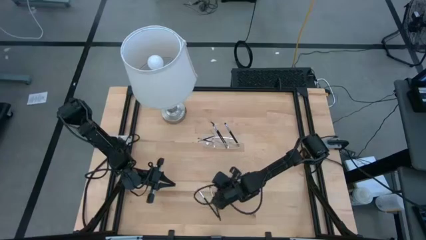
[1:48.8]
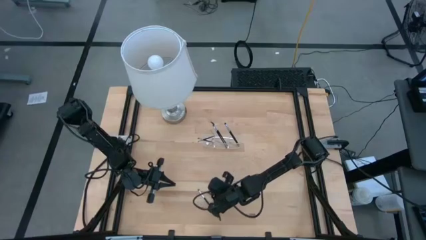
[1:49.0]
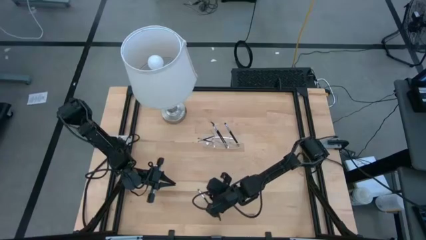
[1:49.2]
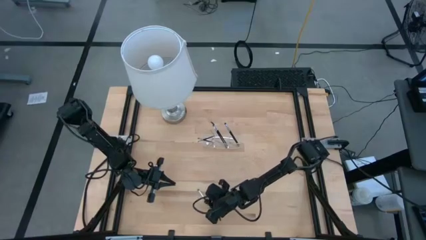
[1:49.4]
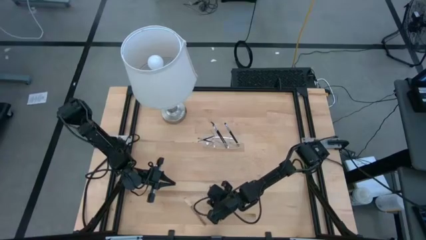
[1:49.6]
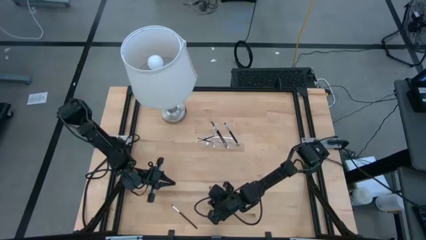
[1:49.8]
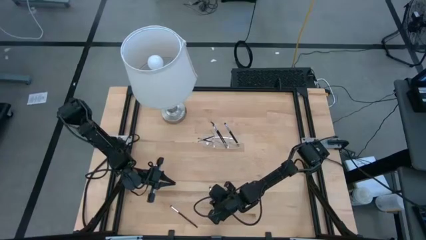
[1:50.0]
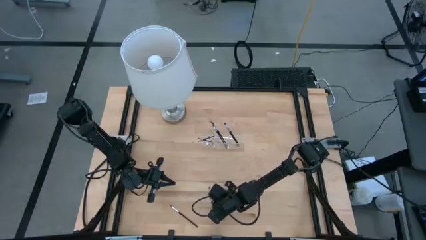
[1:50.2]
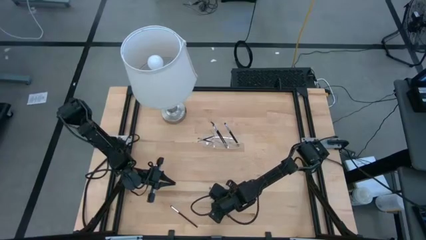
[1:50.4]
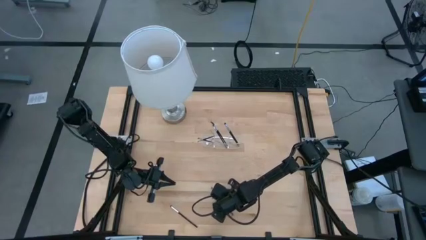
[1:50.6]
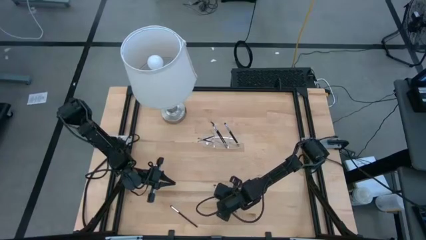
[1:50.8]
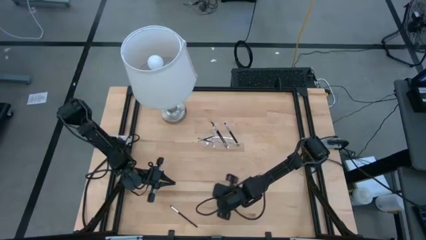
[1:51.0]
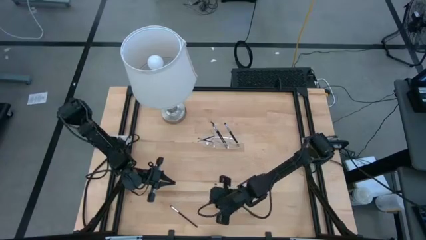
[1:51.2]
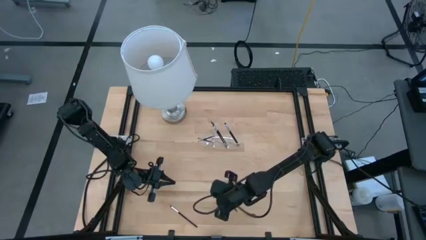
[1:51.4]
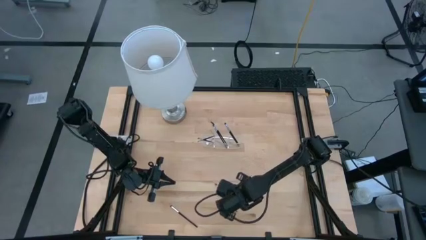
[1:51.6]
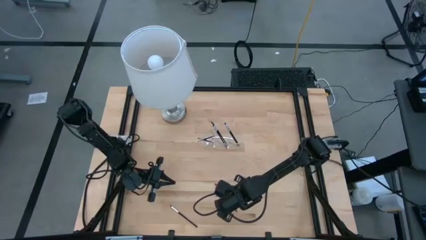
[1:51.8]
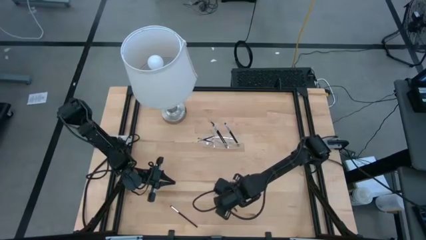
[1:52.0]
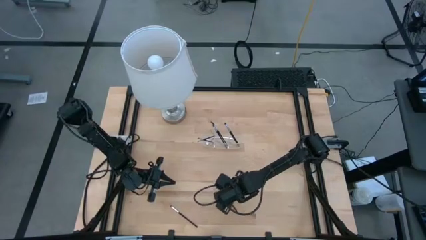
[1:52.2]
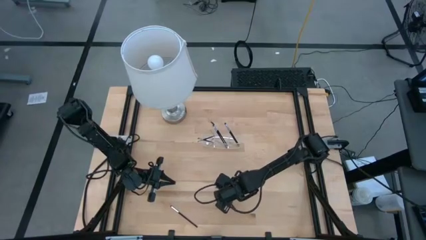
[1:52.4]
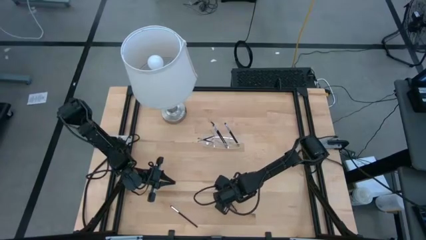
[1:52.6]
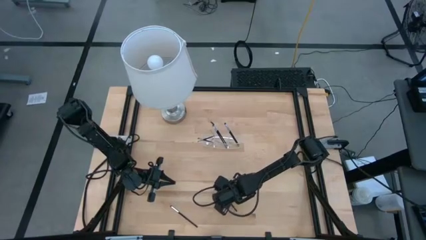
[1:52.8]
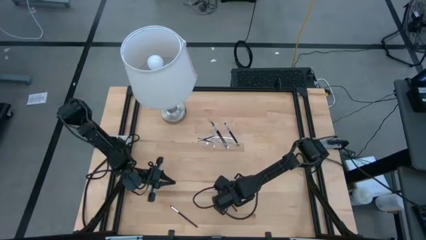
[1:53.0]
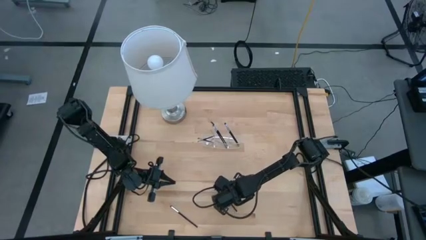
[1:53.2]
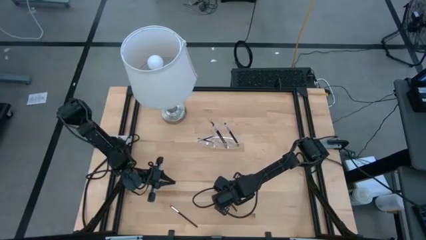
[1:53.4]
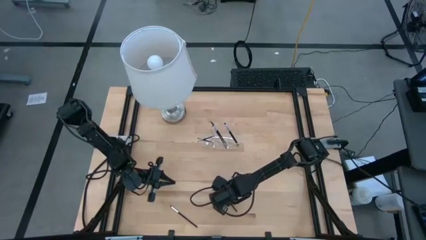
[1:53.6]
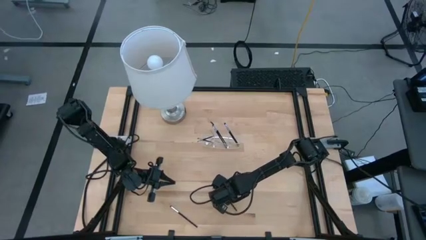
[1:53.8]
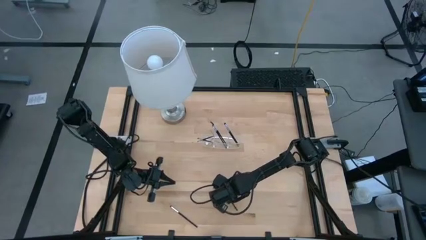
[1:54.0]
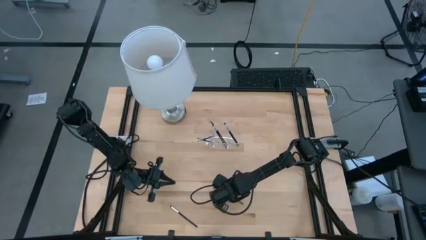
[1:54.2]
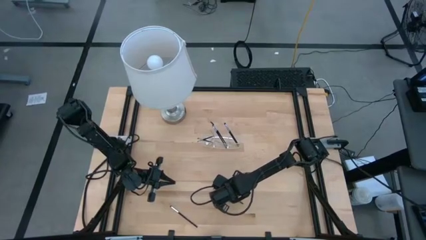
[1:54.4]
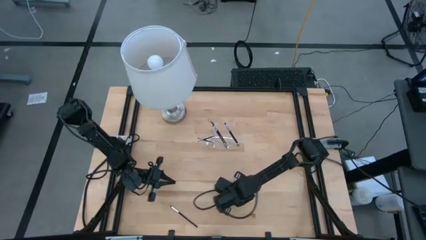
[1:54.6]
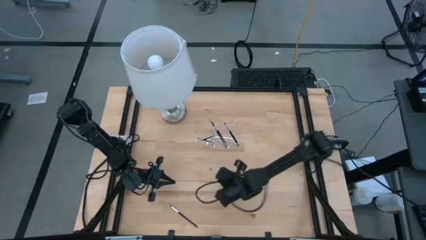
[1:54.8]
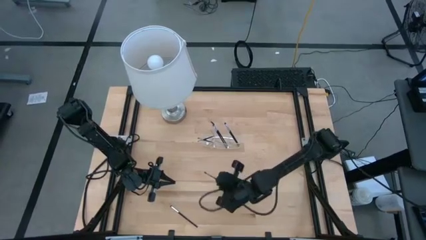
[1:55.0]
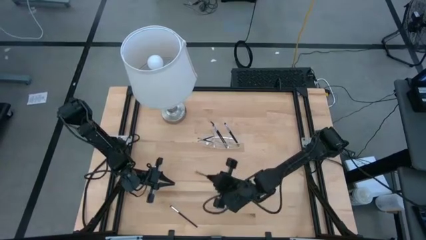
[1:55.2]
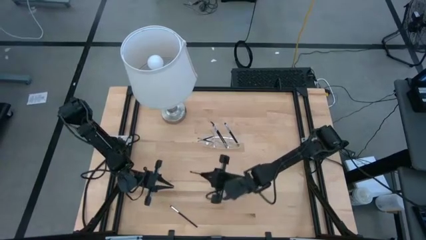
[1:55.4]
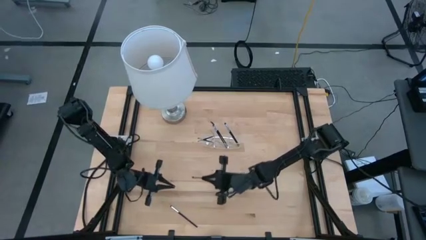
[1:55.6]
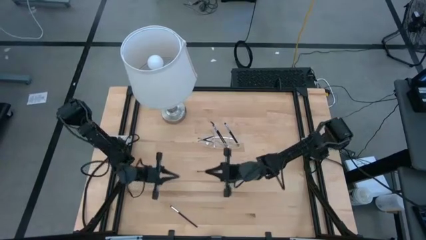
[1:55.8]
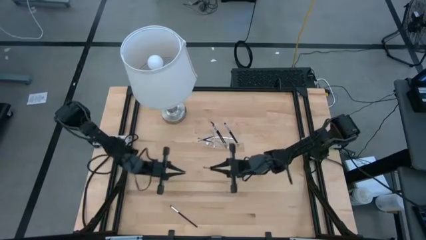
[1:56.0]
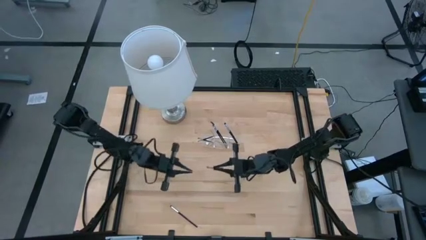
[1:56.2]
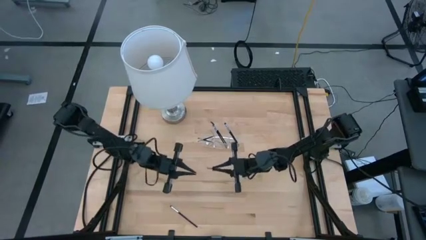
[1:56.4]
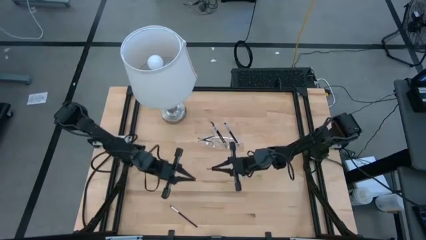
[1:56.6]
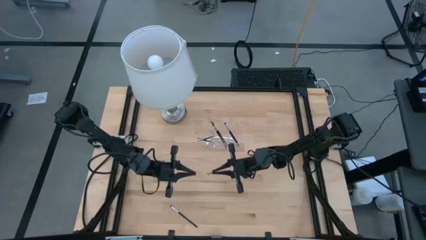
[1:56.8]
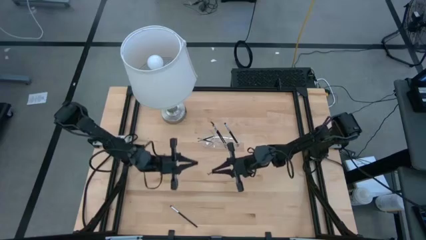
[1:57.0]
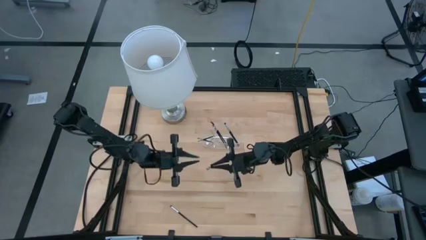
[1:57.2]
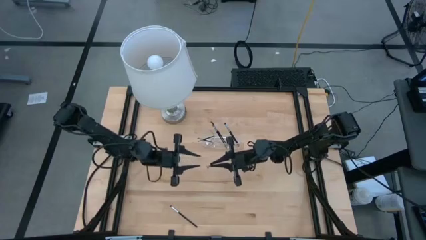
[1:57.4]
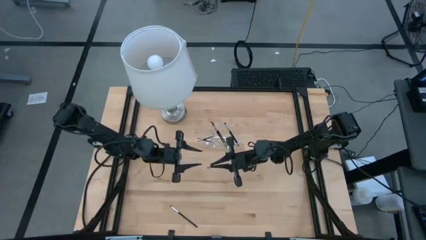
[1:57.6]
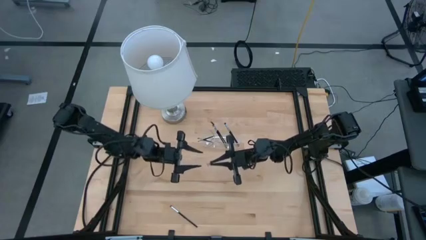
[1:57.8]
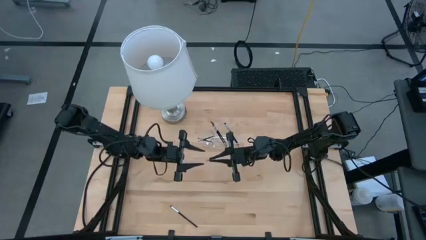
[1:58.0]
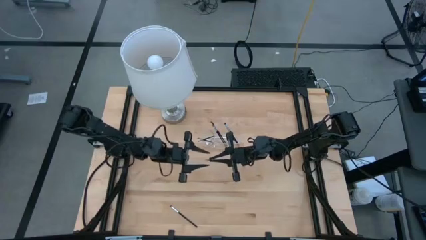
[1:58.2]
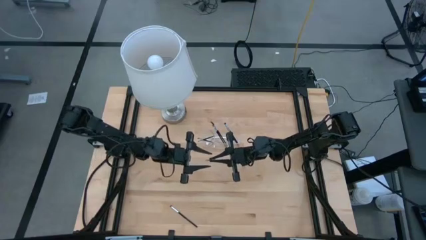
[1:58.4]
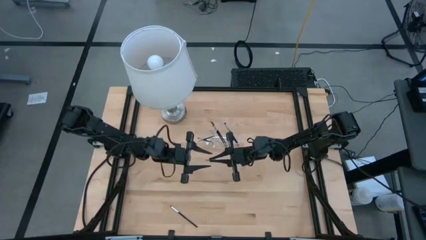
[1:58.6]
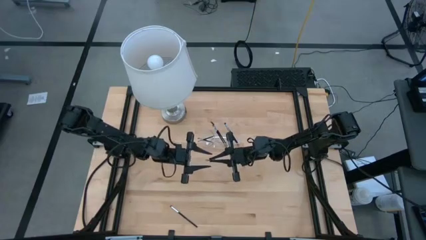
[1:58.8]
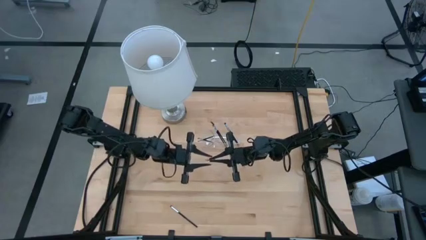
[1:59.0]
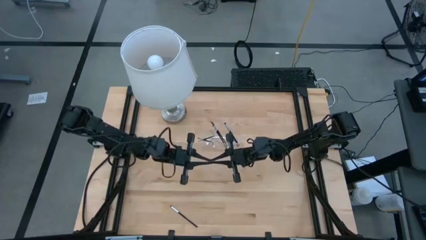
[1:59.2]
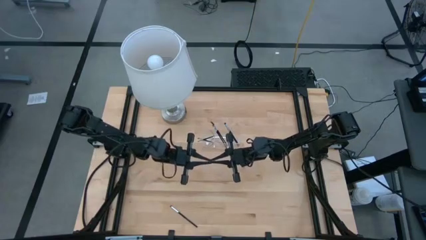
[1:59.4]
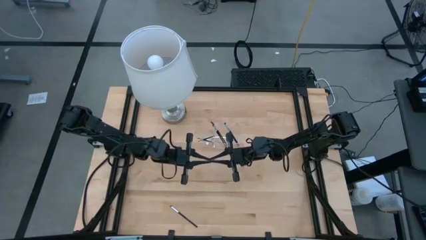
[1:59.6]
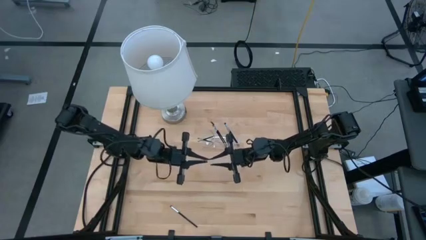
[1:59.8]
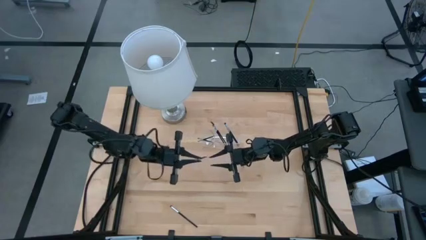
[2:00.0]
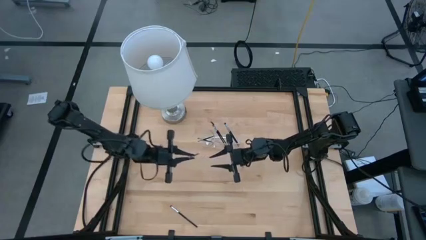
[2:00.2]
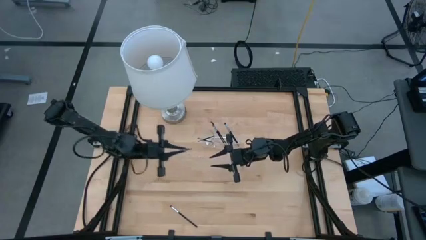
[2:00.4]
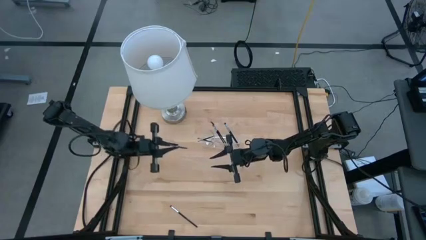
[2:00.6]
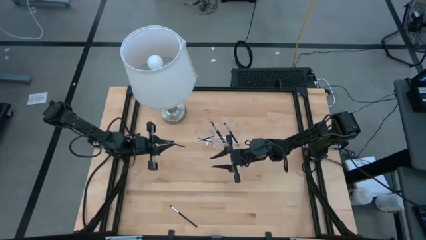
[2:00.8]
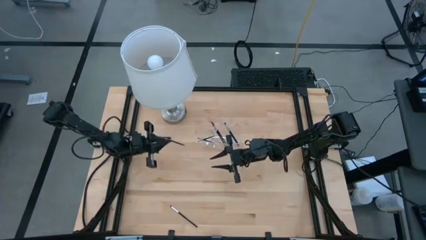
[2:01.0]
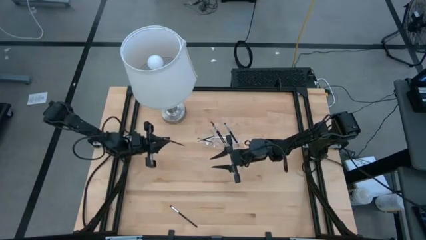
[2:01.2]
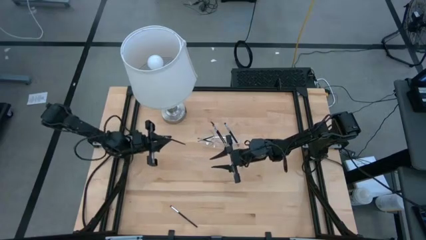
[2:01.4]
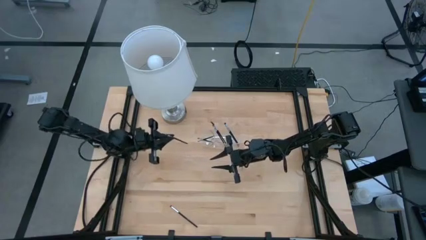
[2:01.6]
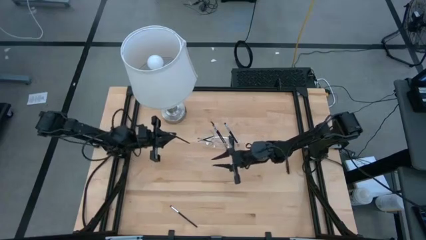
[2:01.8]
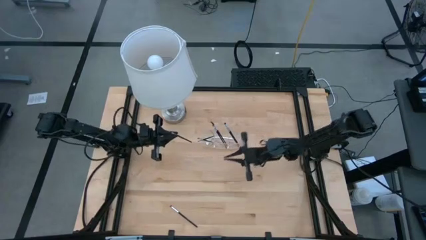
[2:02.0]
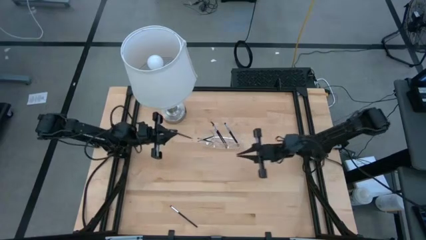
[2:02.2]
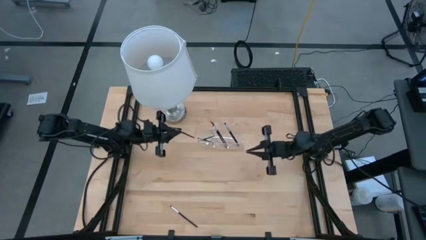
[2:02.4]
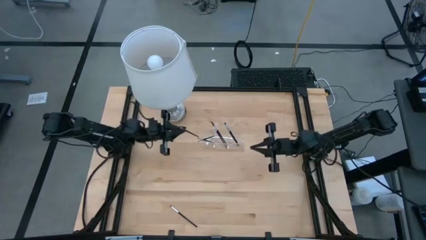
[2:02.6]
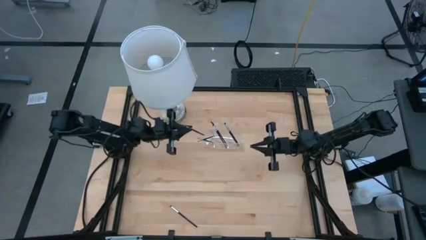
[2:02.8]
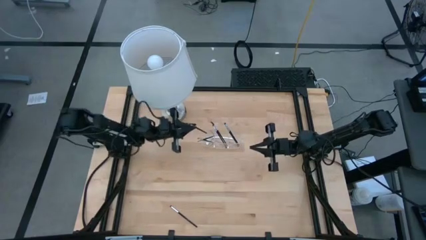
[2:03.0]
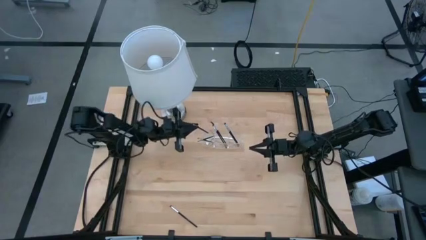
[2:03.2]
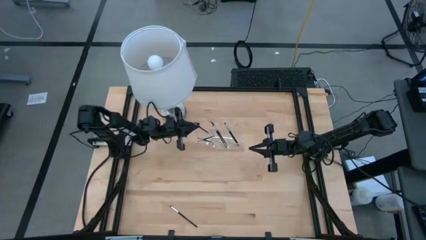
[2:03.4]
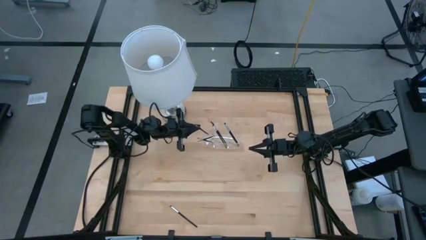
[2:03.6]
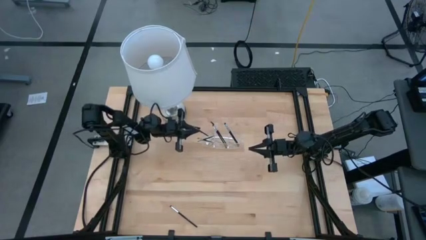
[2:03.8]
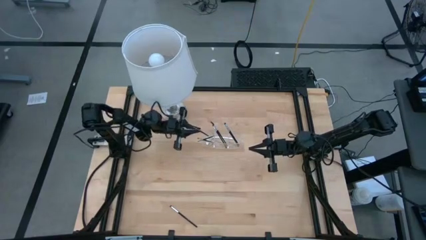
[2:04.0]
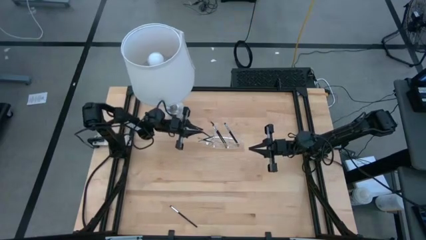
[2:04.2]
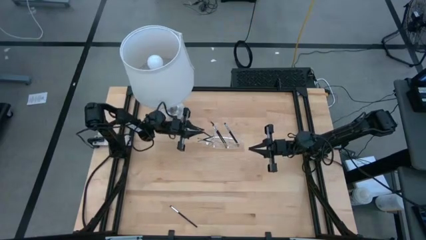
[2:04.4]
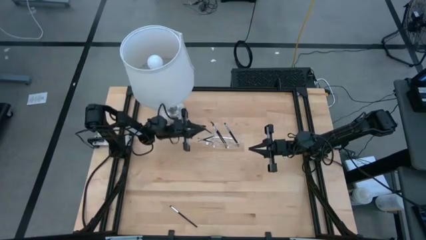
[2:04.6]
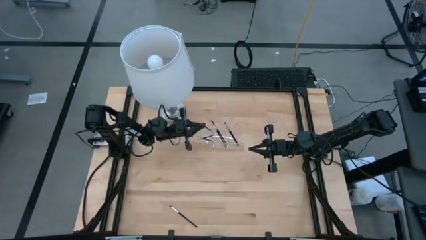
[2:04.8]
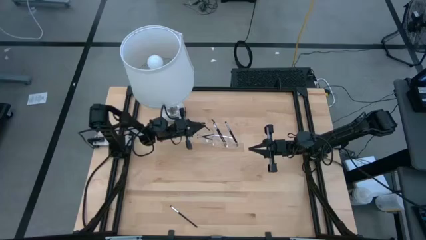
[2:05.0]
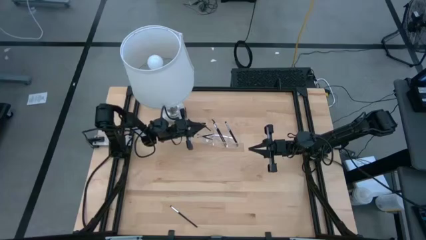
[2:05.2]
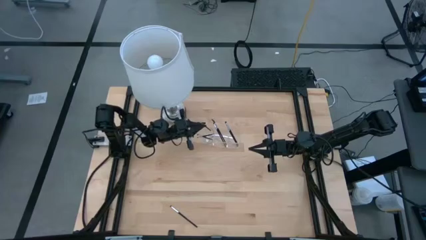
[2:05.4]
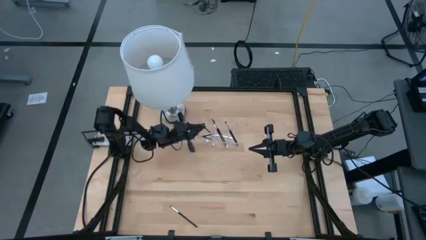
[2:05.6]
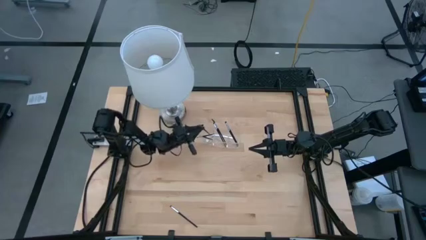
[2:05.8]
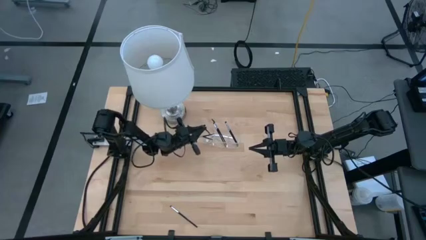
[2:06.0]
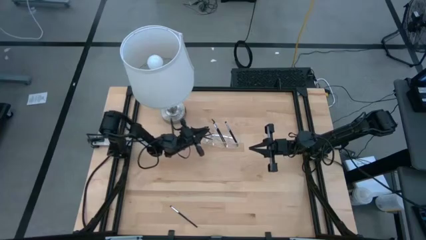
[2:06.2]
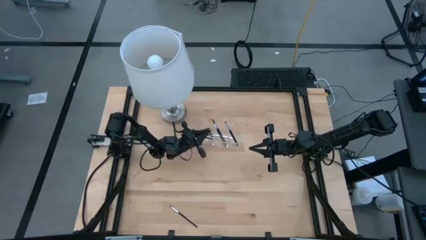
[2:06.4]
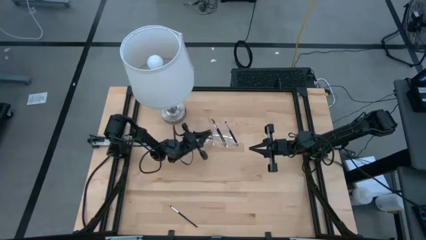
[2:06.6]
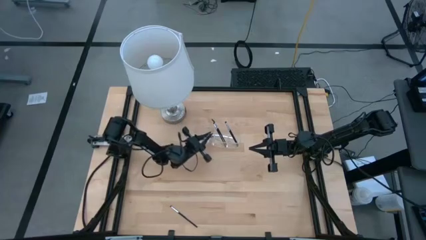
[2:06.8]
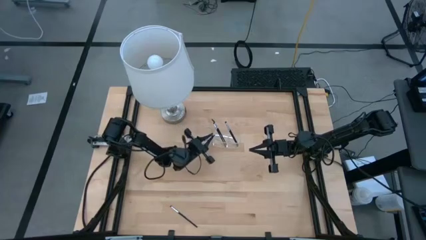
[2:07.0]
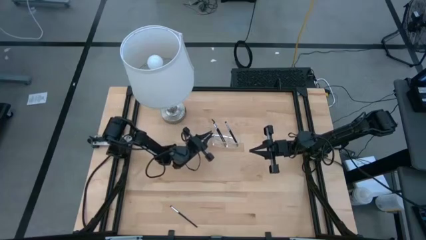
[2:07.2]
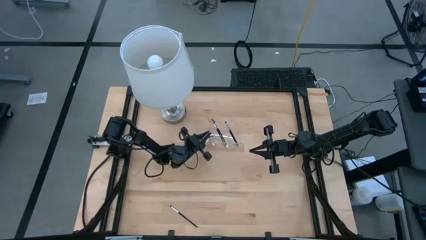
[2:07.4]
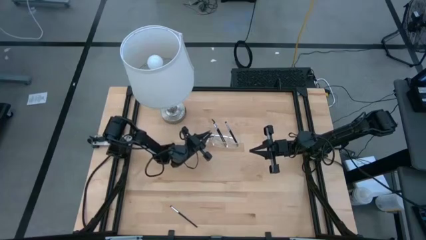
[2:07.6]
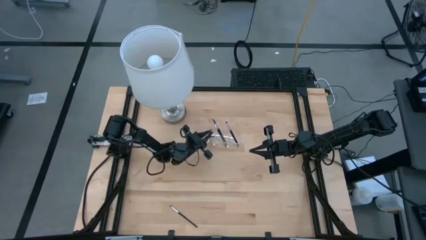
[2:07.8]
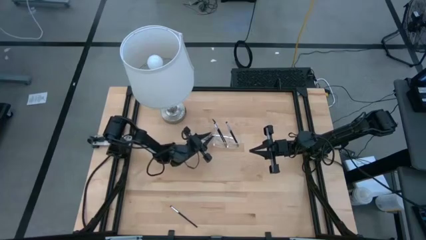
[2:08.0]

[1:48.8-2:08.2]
Task: Sort items
Put the eyeshadow brush into the transparent organizer
